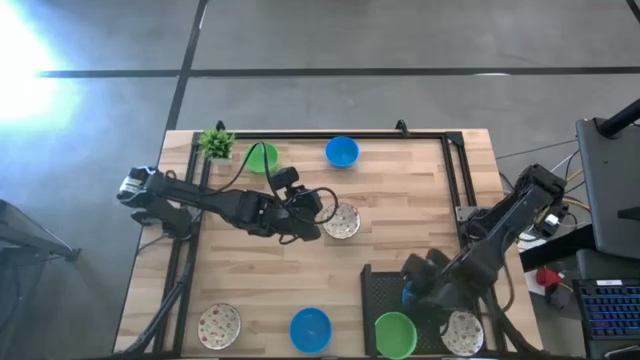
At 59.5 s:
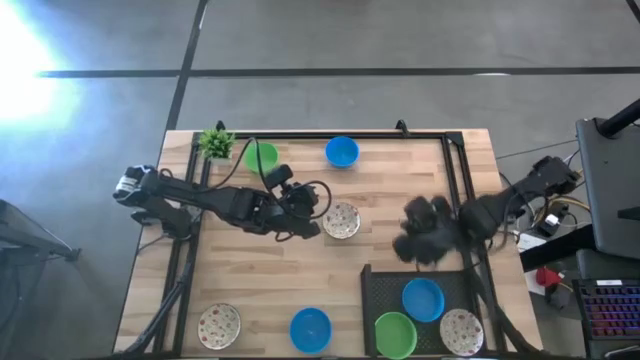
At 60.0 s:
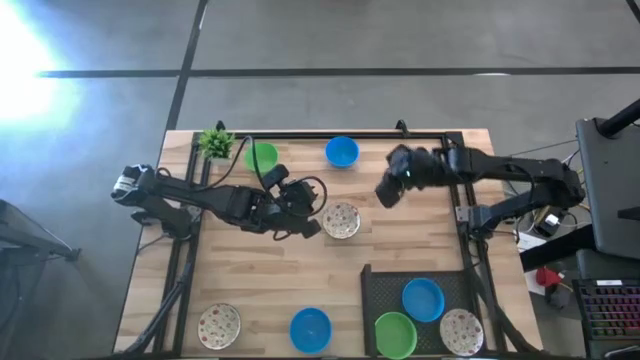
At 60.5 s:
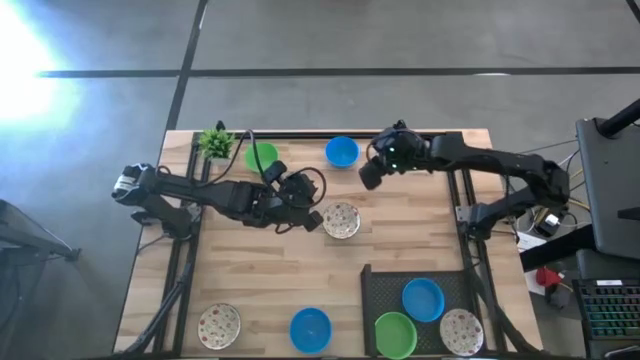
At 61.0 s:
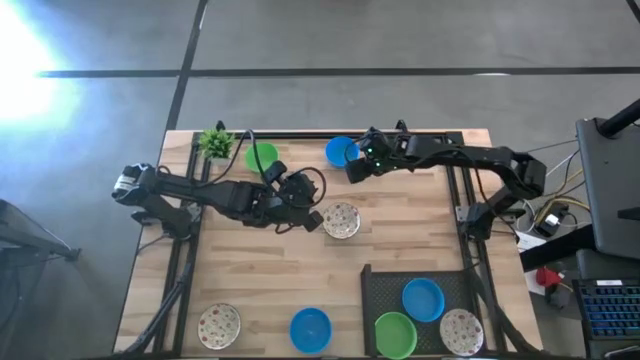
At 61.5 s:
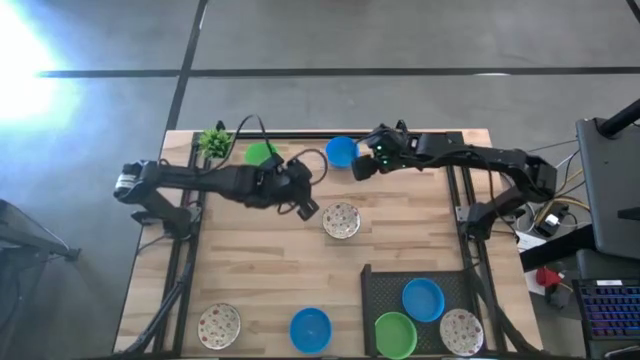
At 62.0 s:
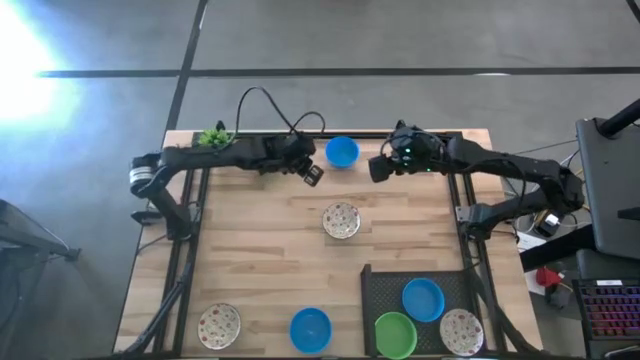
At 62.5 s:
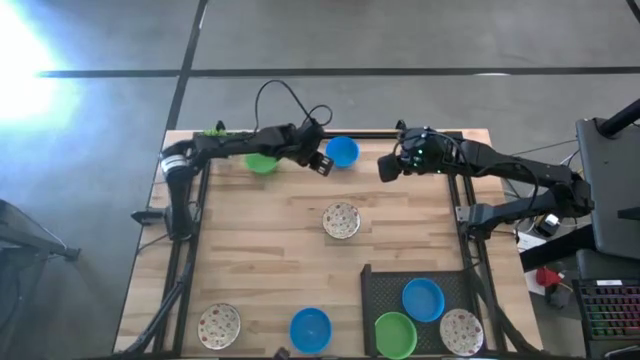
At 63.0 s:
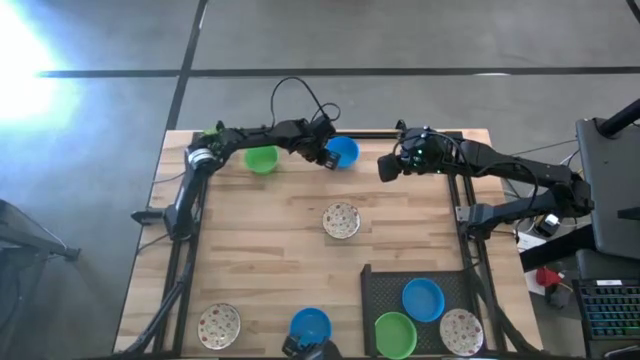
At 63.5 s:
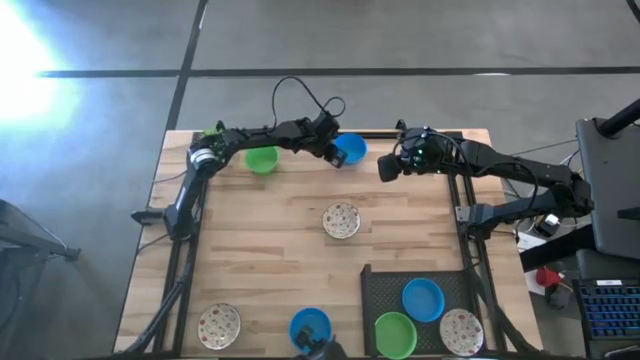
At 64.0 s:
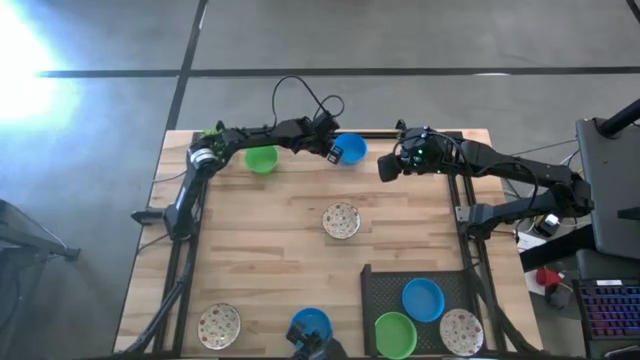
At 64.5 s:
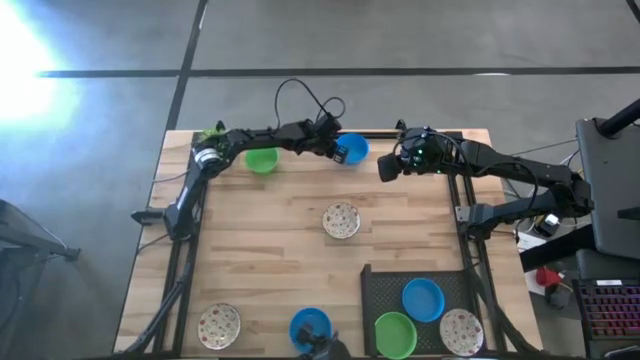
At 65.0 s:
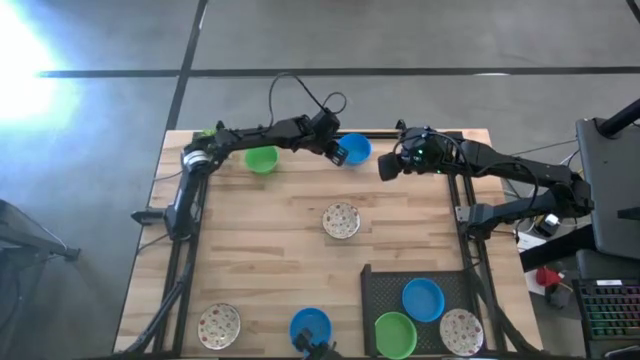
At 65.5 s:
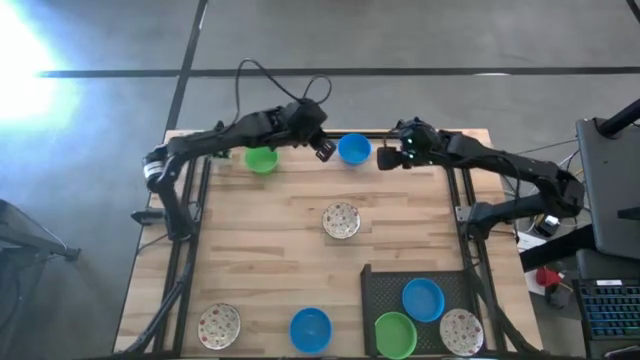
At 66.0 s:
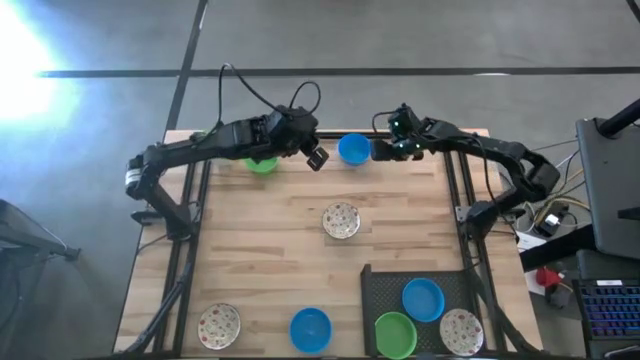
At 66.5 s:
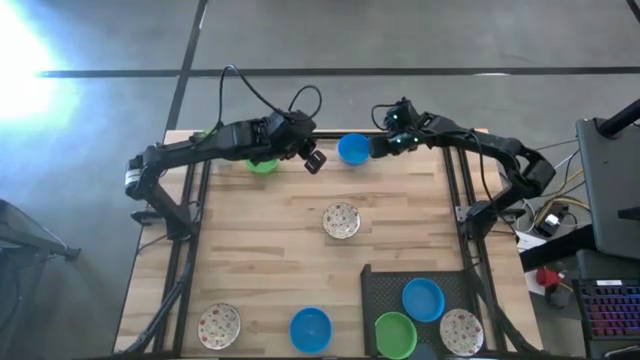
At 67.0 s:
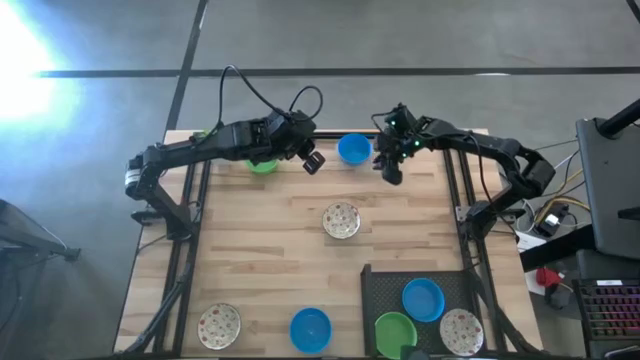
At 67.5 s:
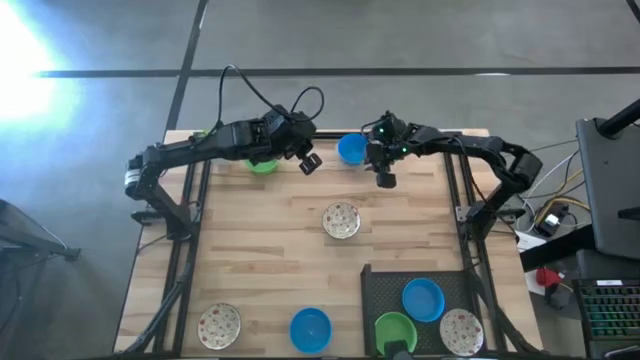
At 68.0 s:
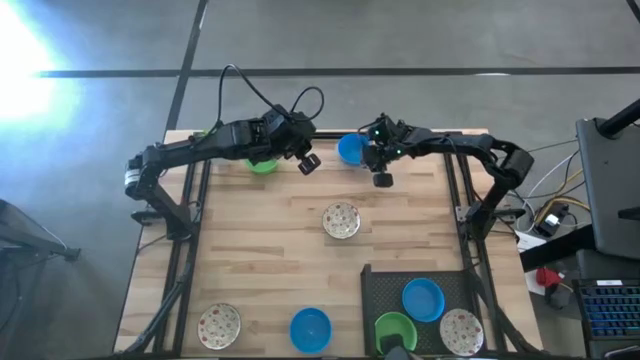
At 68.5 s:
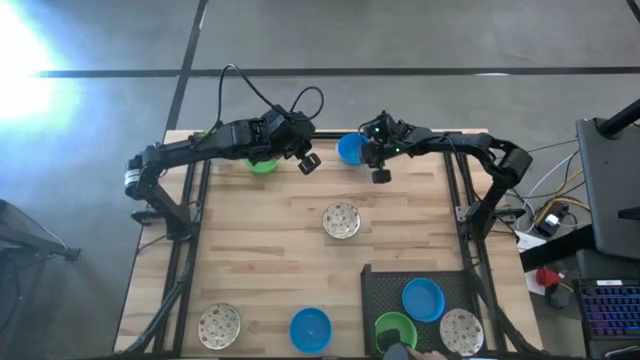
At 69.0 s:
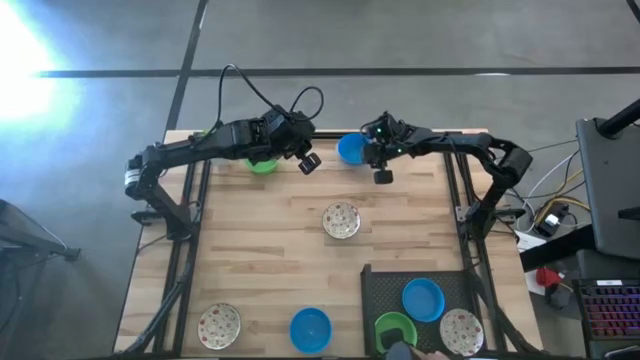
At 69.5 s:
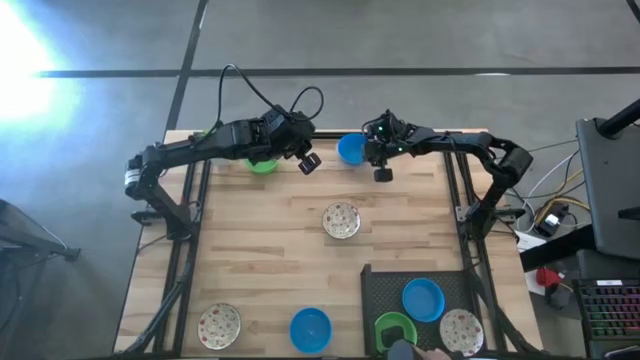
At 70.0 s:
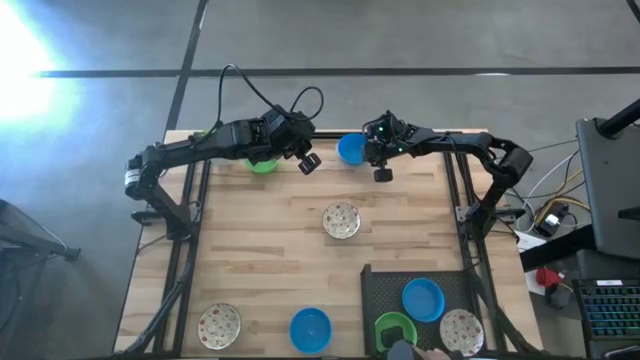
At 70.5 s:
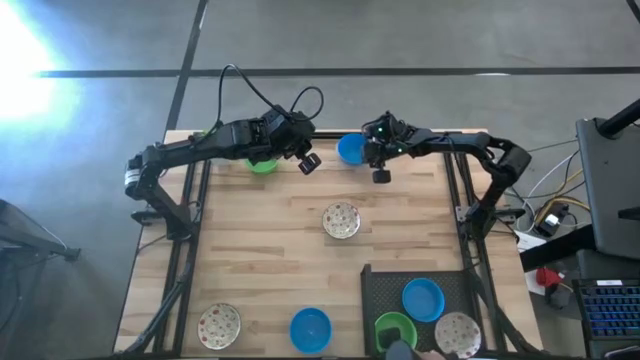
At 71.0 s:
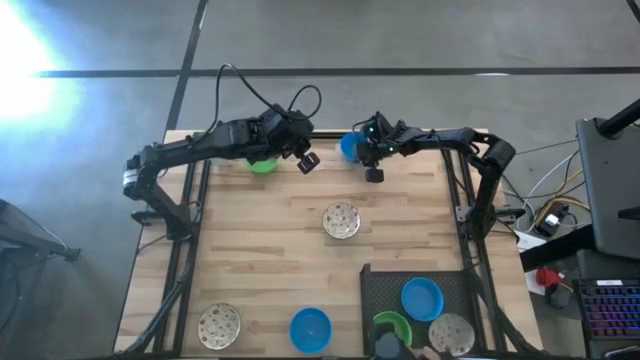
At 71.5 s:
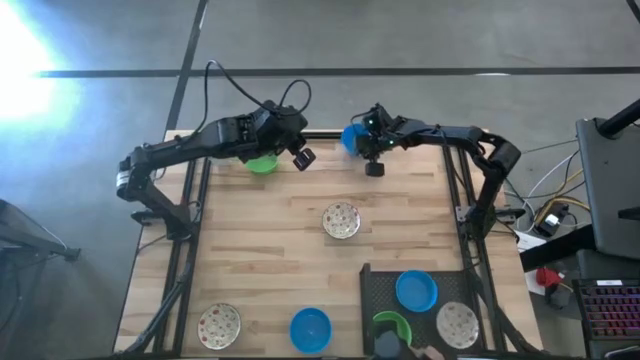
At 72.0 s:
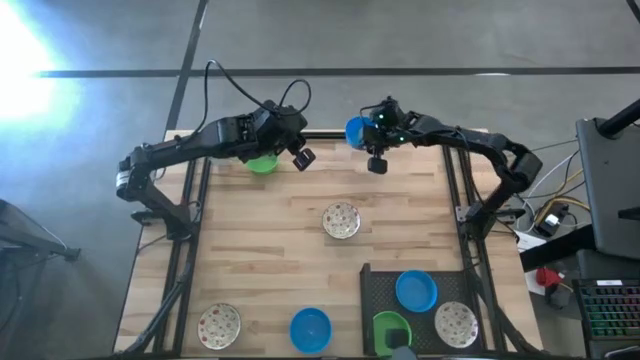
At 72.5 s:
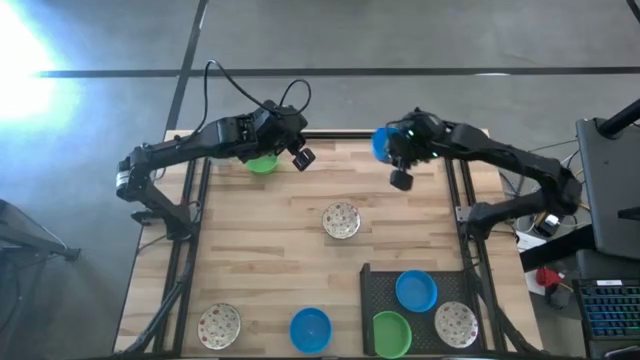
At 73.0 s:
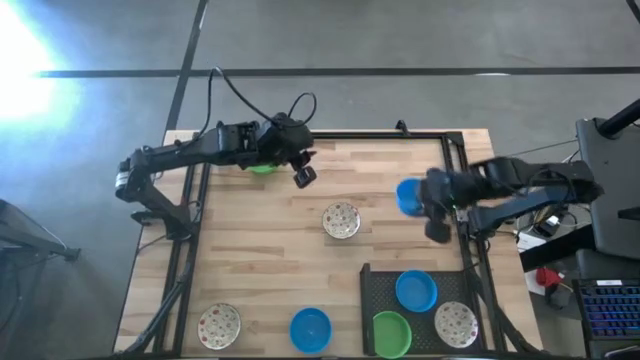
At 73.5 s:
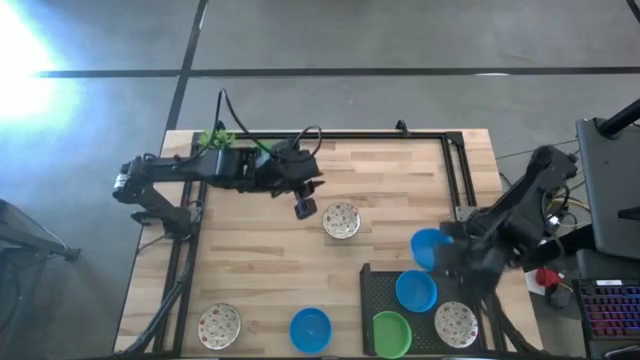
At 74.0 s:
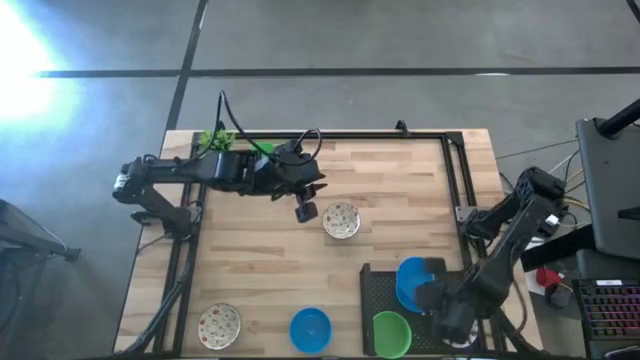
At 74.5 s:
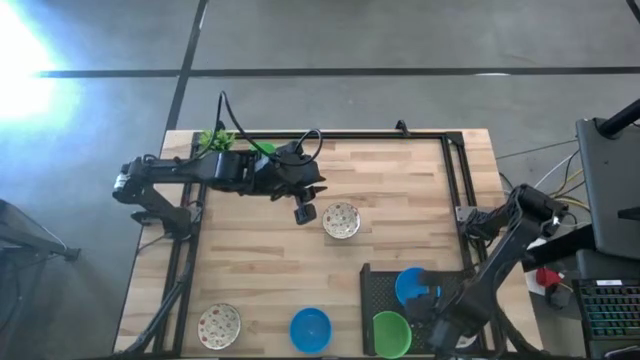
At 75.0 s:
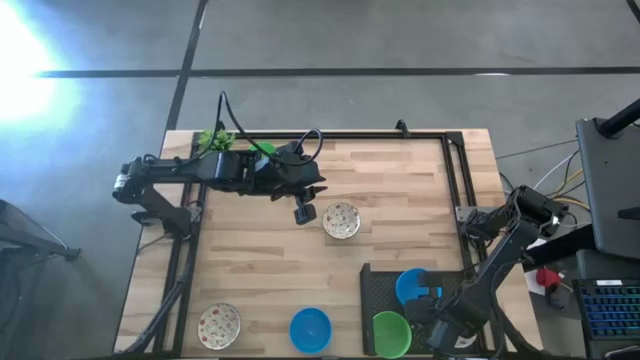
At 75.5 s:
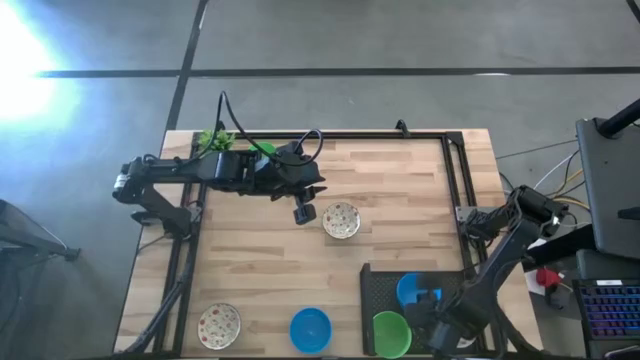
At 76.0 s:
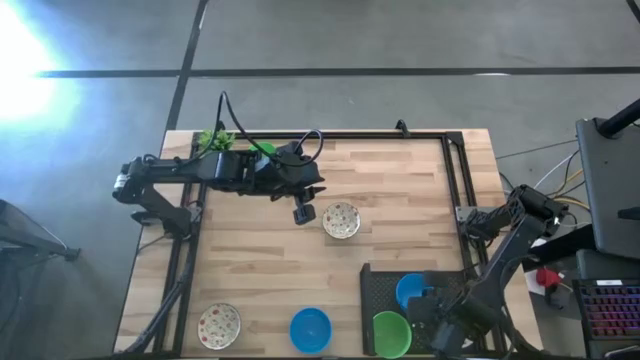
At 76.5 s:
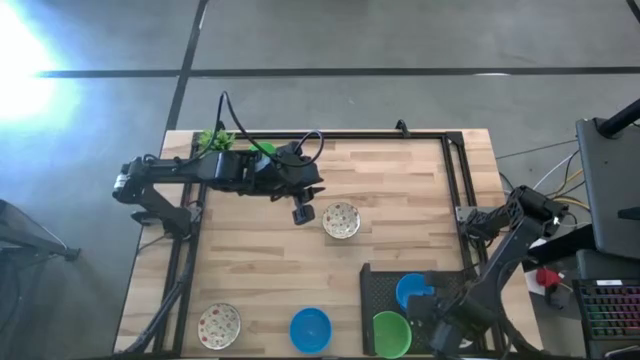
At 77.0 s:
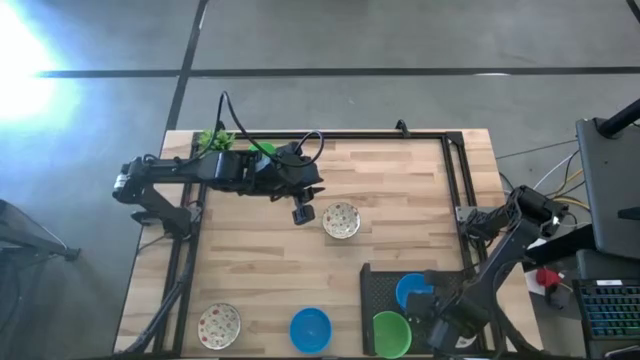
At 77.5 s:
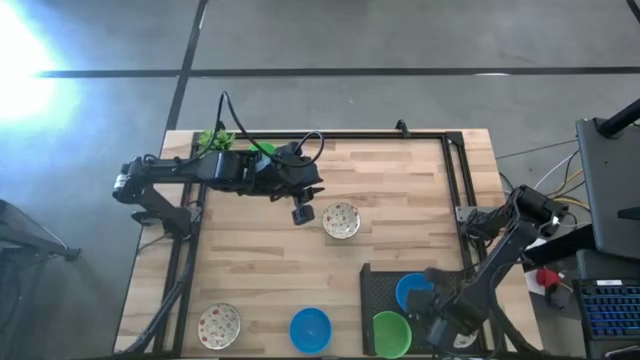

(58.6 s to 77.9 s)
Task: Pick & Place Mini bowls
Stack the top blue bowl on top of the blue bowl on the shelf
